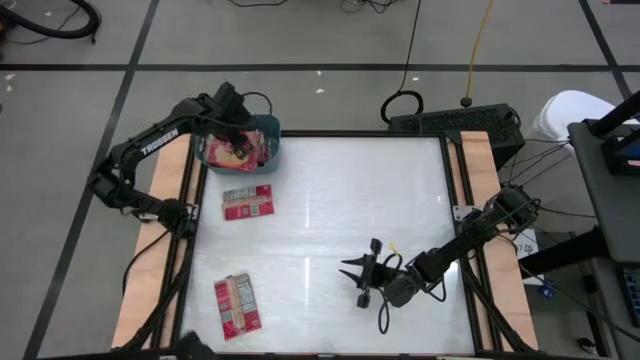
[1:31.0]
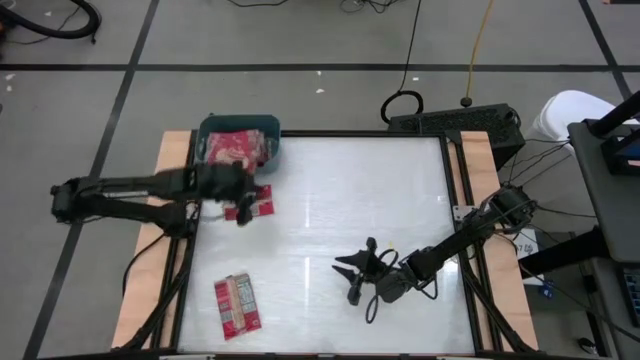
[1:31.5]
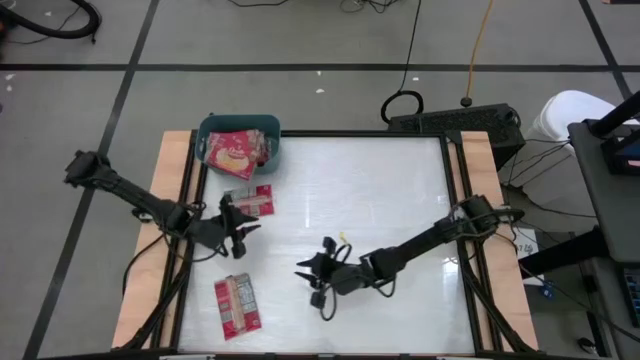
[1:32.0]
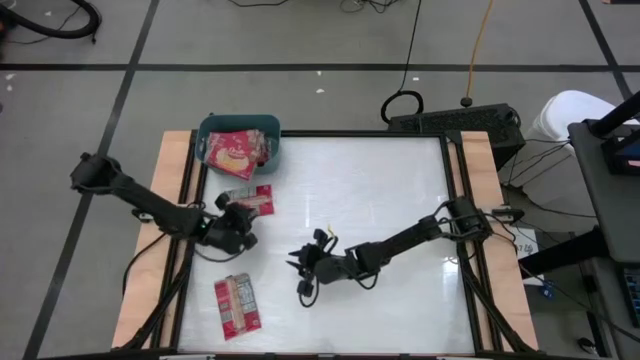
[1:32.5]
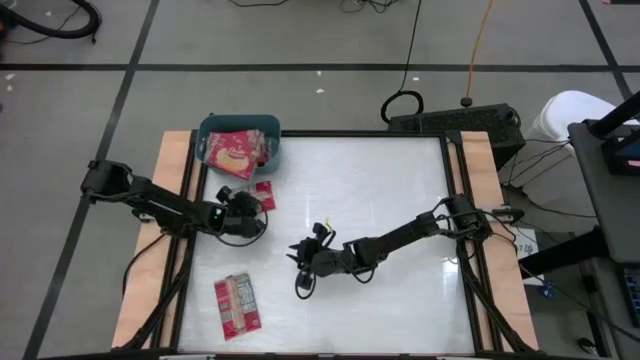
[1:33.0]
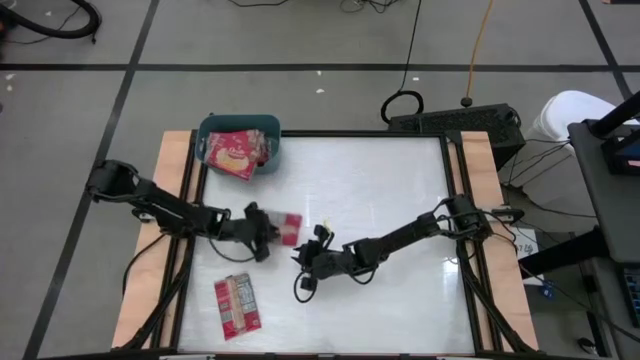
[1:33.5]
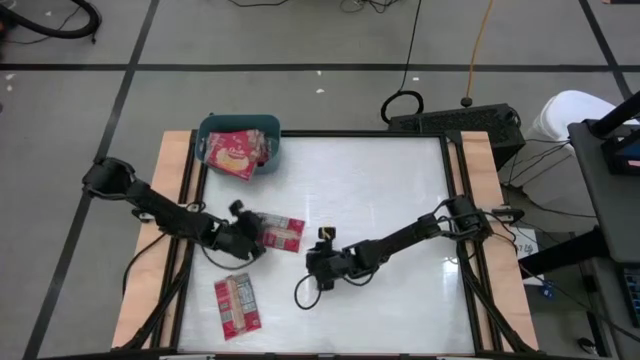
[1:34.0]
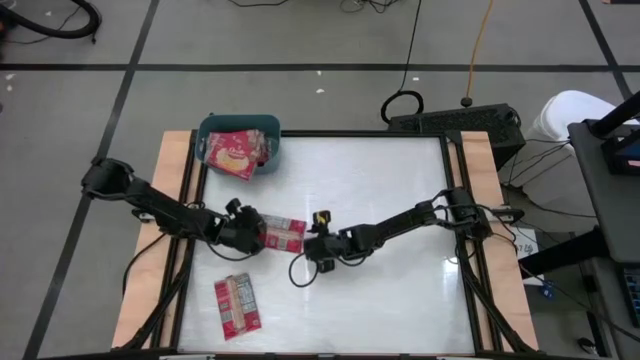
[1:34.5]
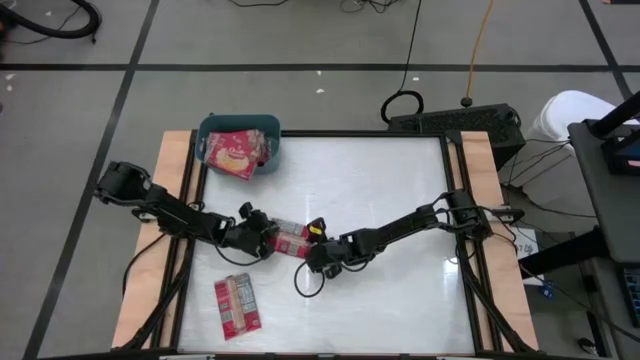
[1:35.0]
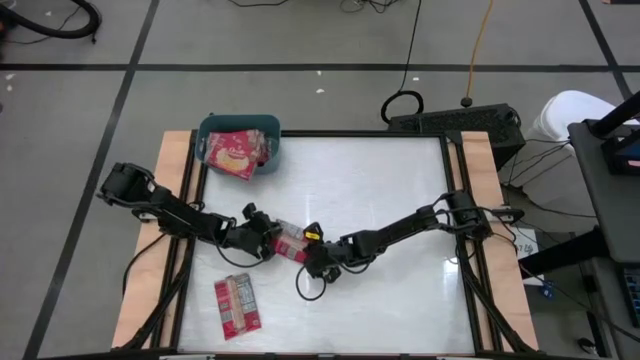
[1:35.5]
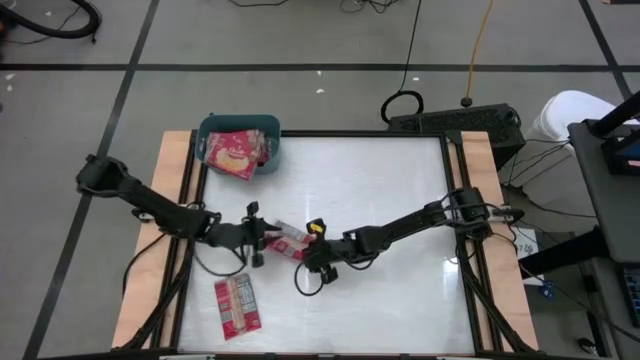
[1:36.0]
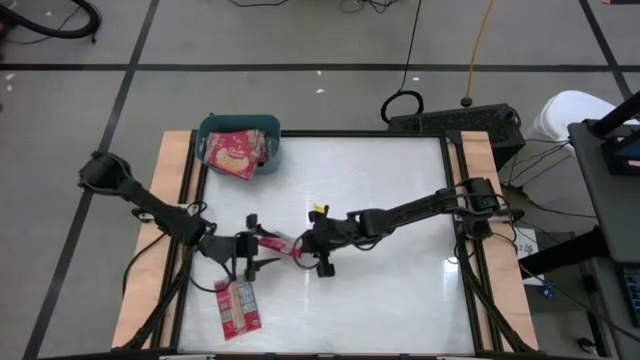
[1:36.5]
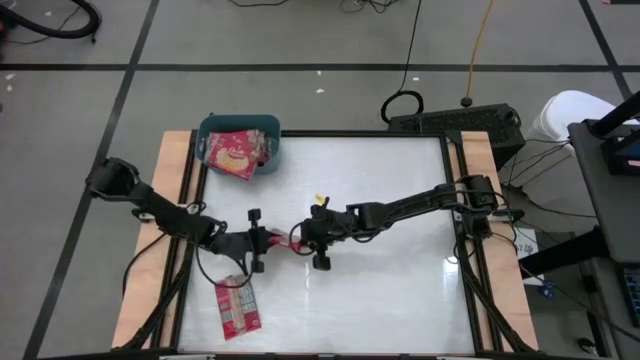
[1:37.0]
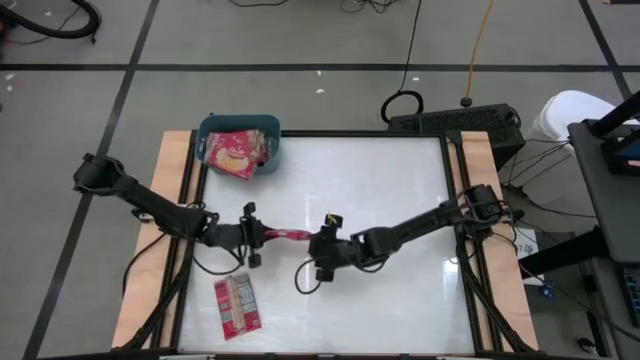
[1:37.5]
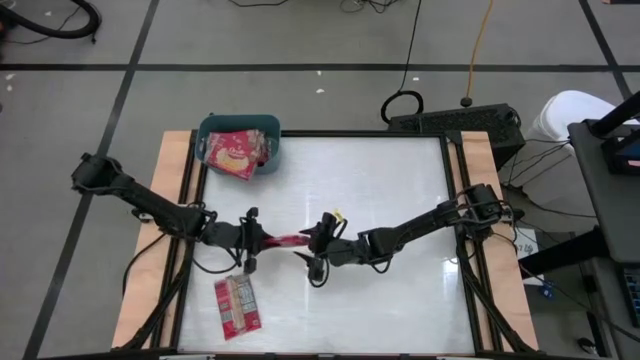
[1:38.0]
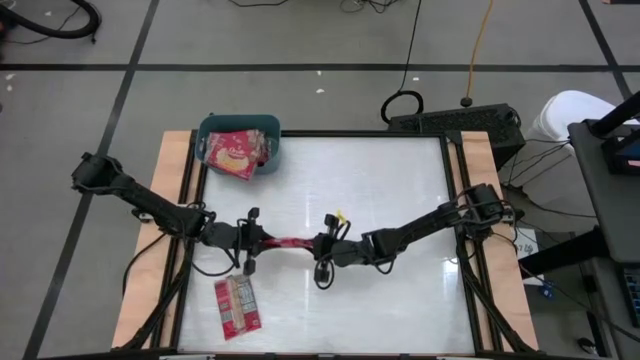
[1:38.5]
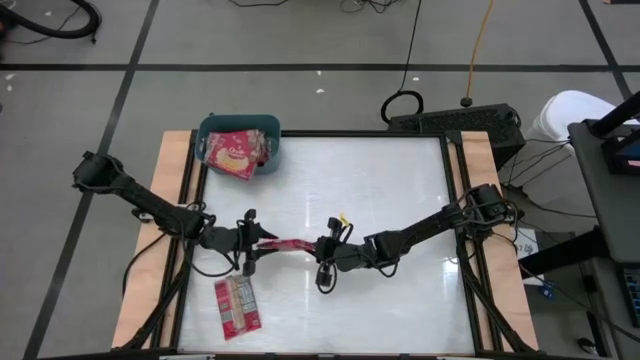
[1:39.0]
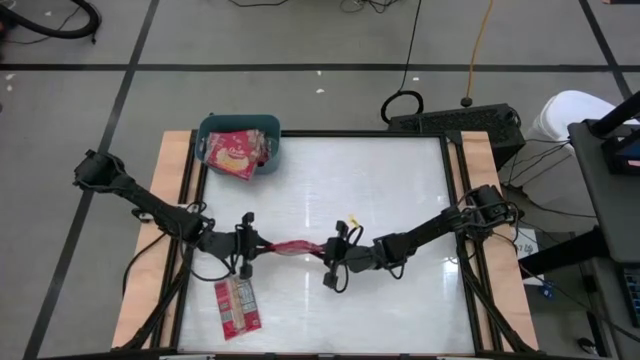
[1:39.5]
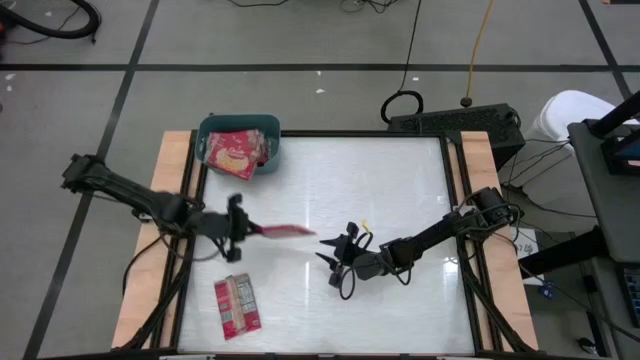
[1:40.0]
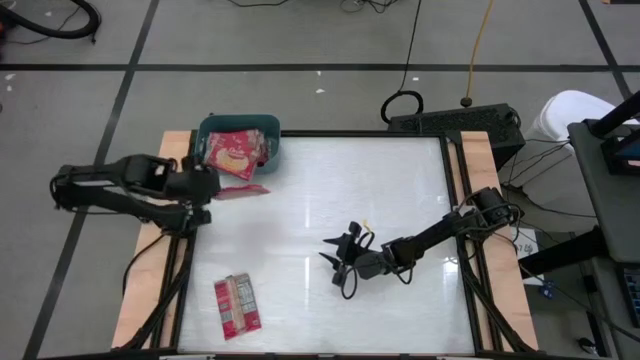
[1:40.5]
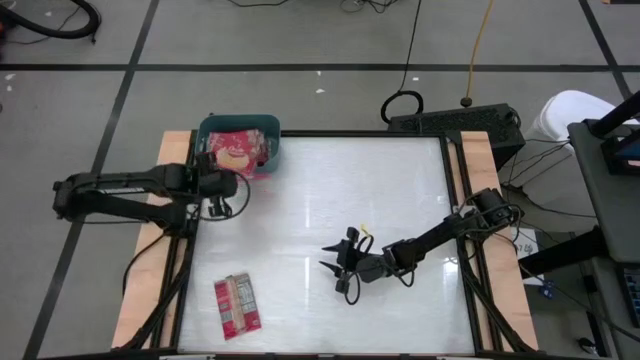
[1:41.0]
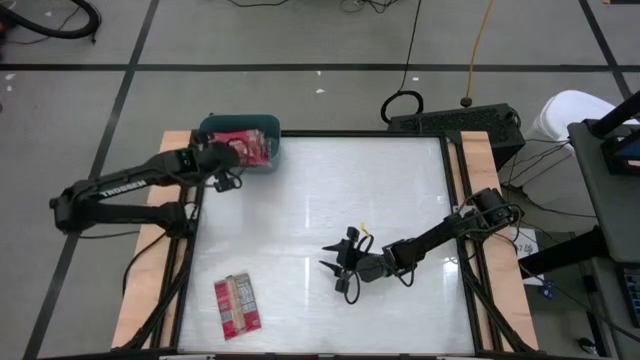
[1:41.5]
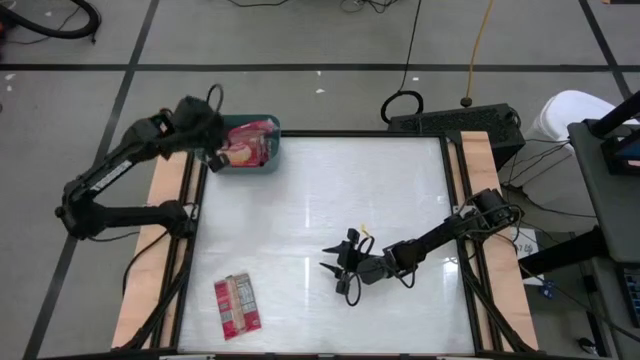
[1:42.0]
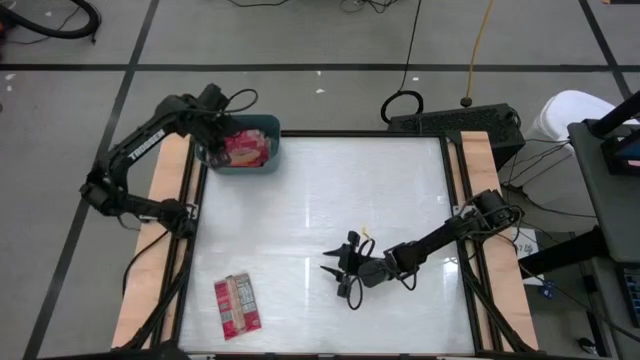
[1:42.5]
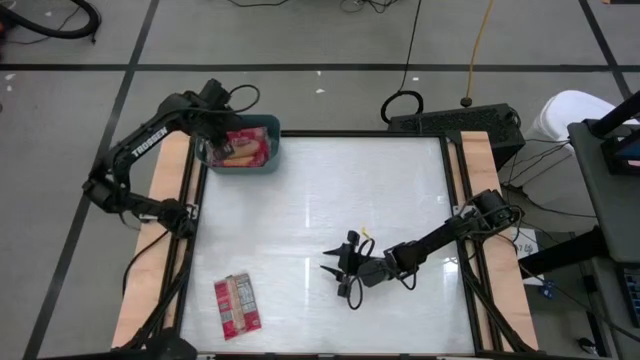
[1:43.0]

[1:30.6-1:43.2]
Task: Sort popcorn bags into baskets
Put the red popcorn bag into the blue bin

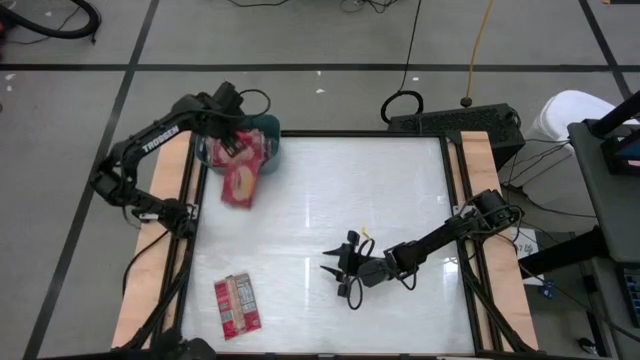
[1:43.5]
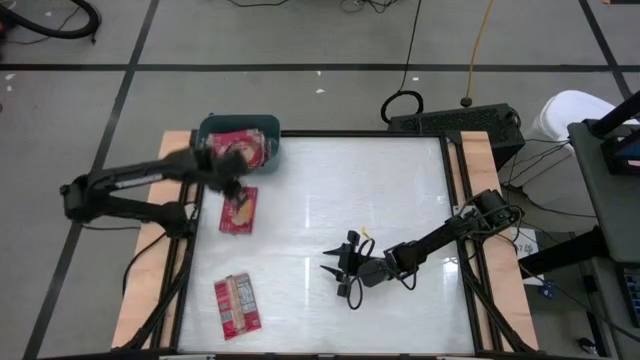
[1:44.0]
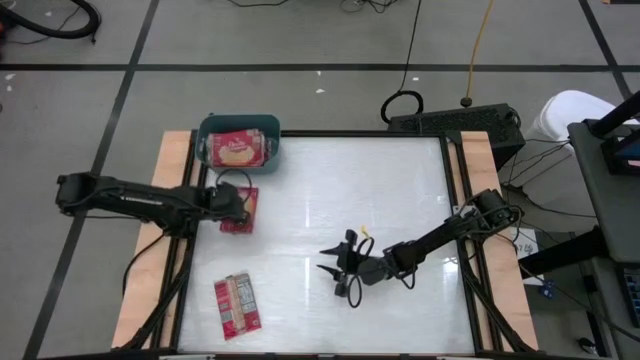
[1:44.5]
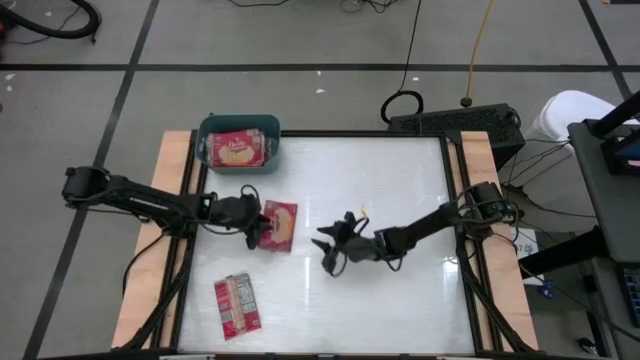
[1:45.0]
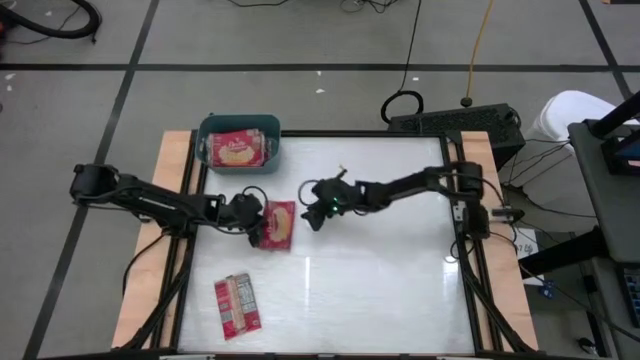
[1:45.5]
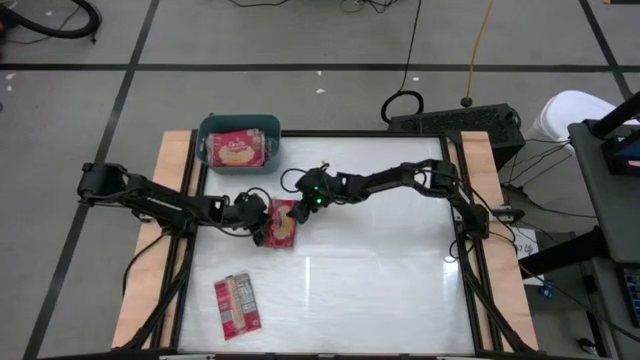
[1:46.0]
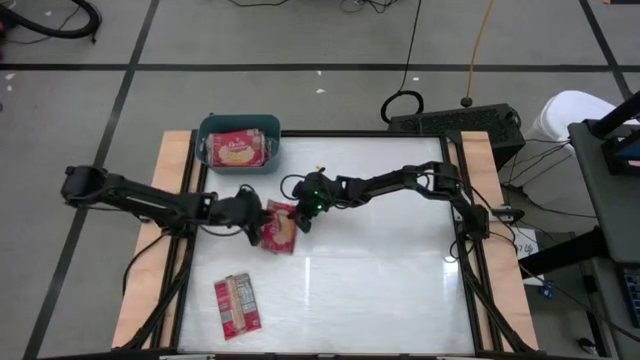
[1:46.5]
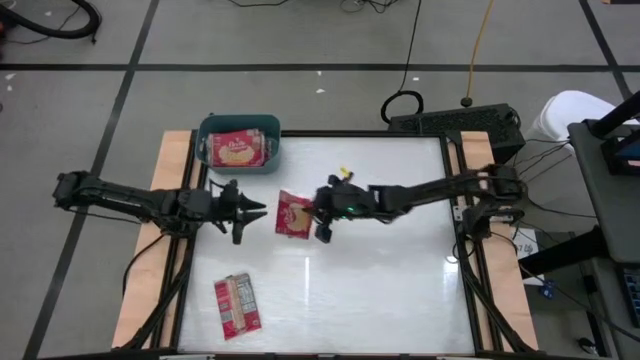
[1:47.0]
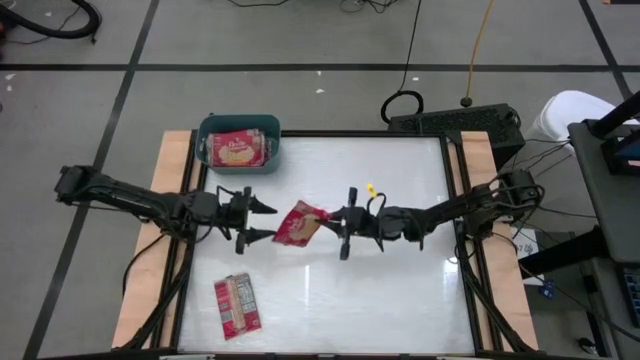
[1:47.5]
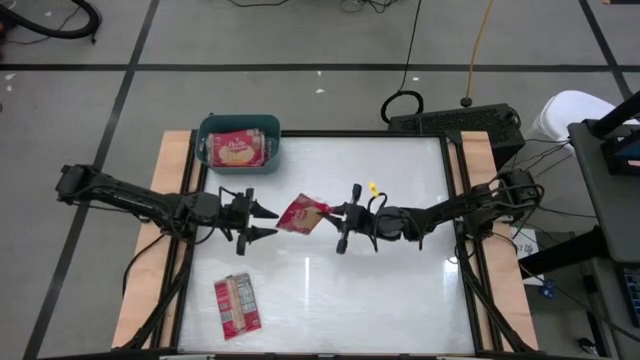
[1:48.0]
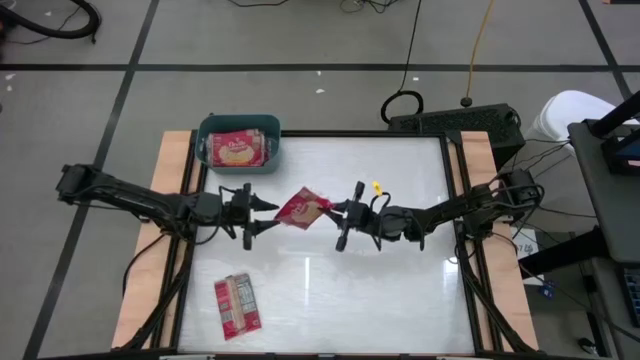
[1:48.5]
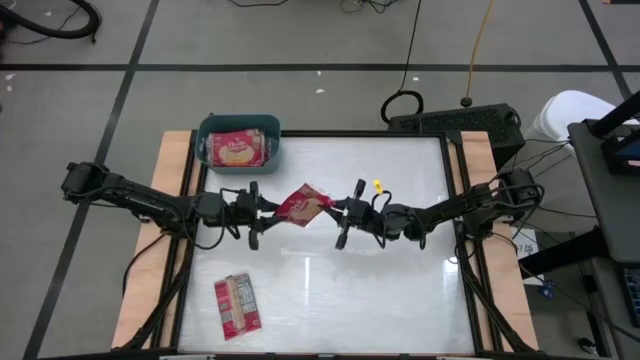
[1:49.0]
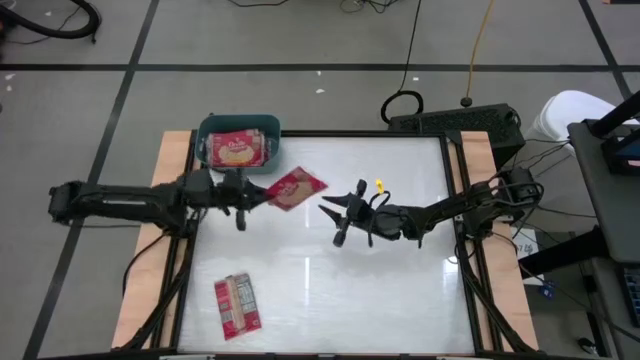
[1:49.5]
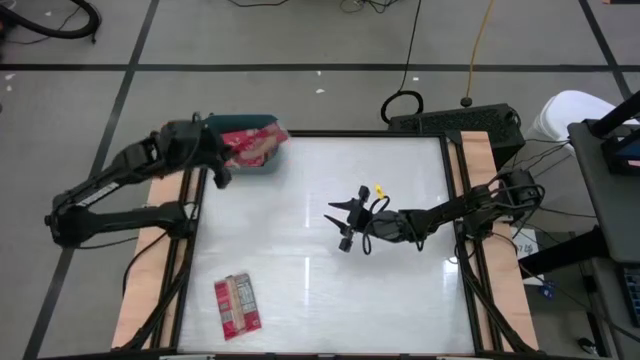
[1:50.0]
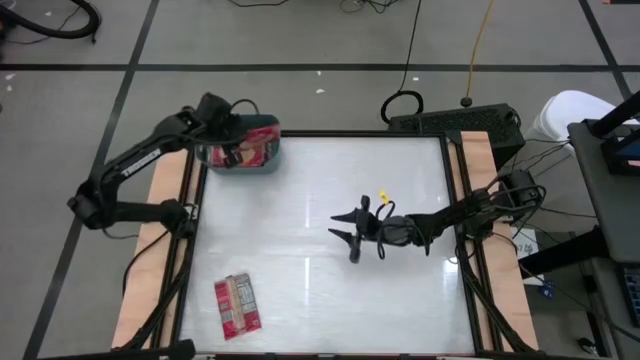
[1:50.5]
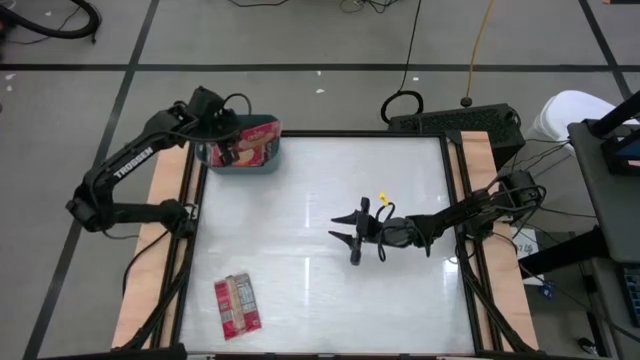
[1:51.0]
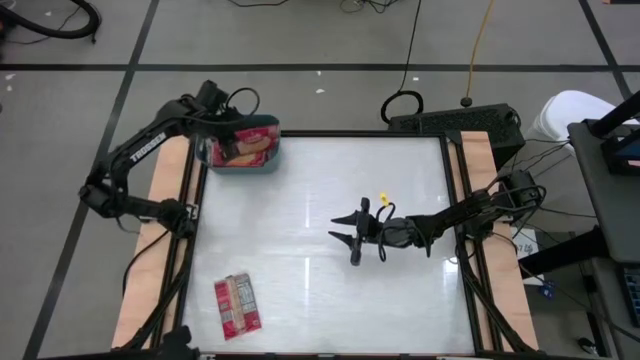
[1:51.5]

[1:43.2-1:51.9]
Put the red popcorn bag into the blue bin
